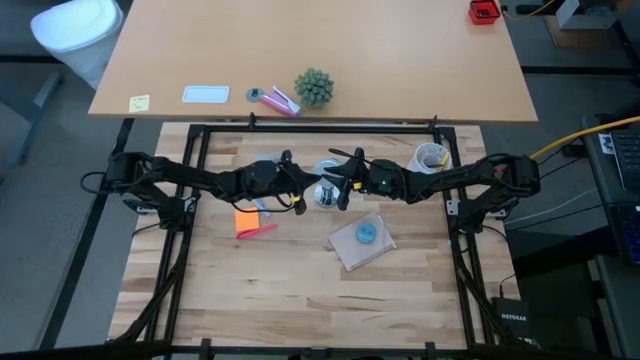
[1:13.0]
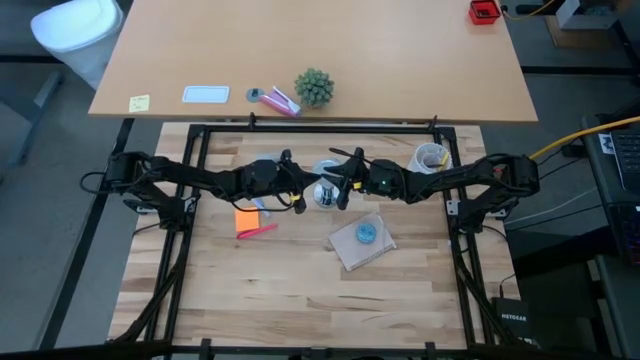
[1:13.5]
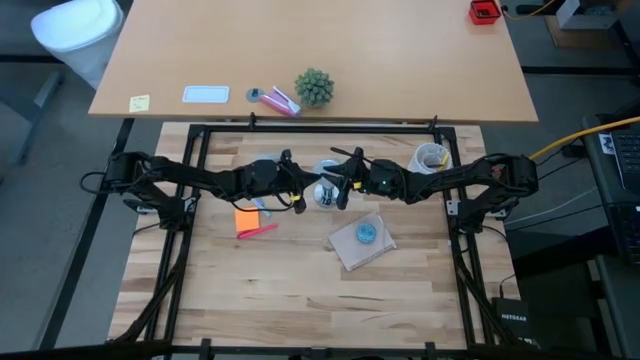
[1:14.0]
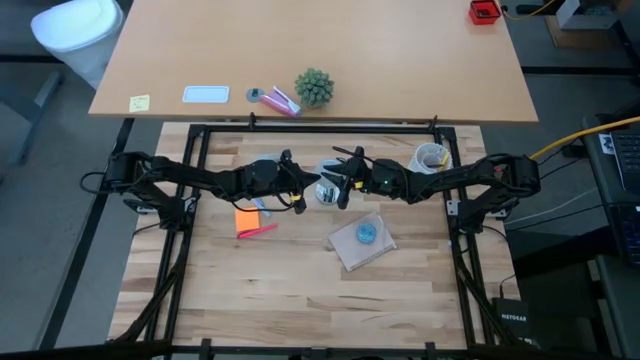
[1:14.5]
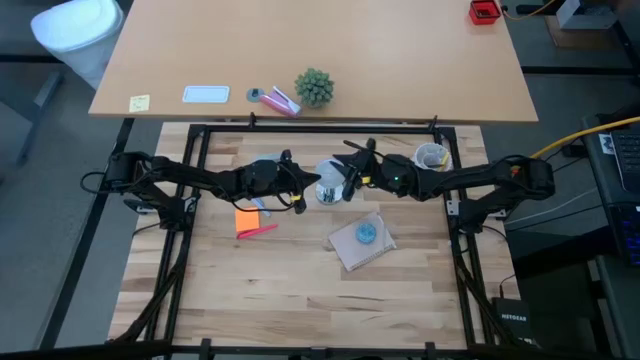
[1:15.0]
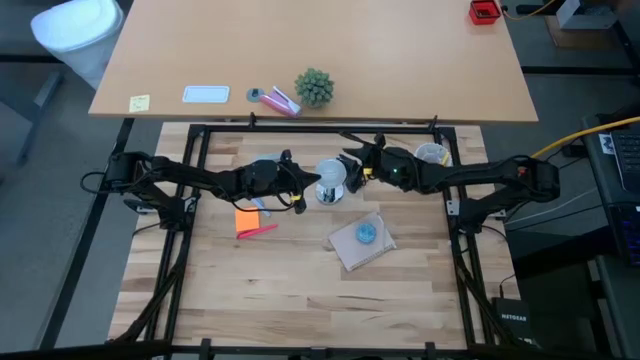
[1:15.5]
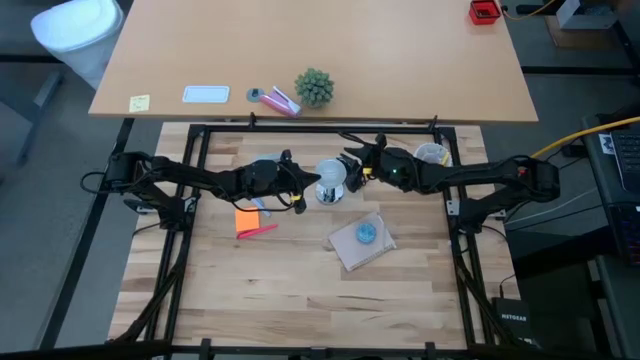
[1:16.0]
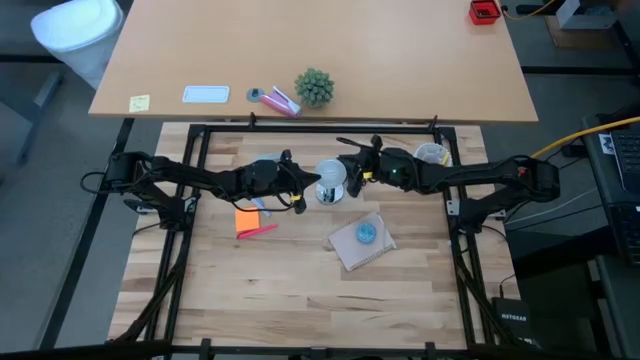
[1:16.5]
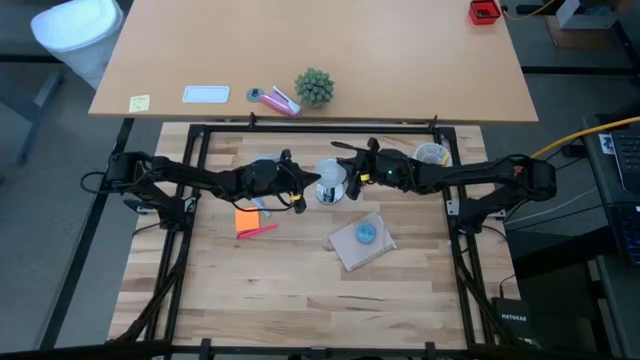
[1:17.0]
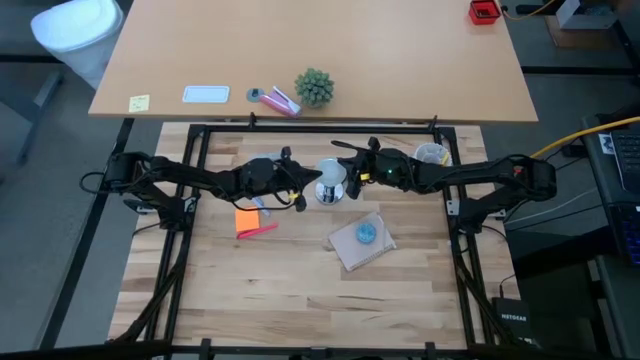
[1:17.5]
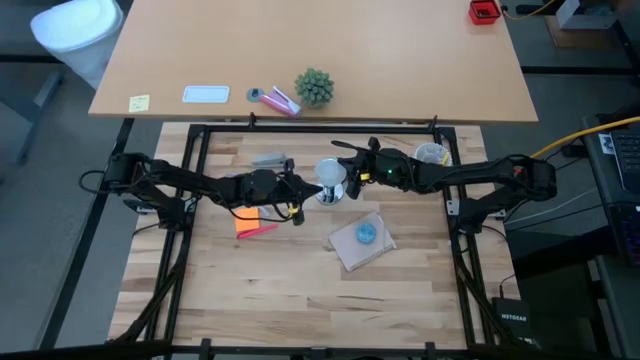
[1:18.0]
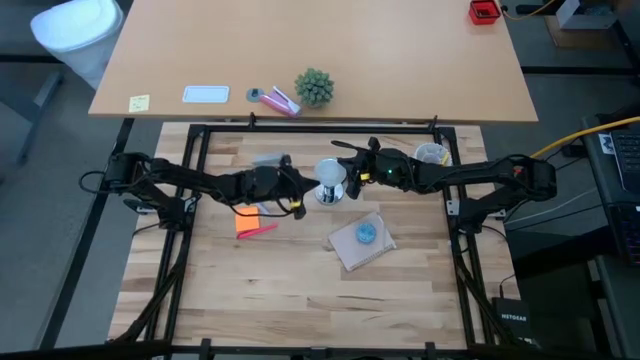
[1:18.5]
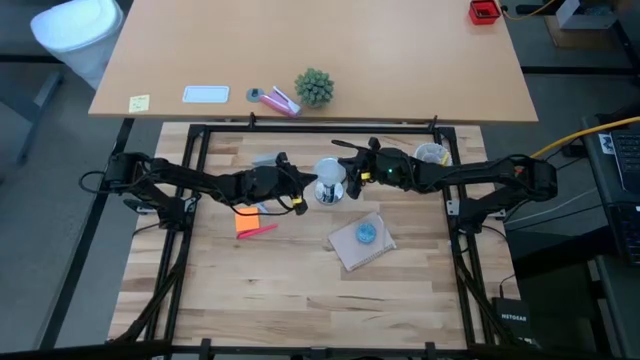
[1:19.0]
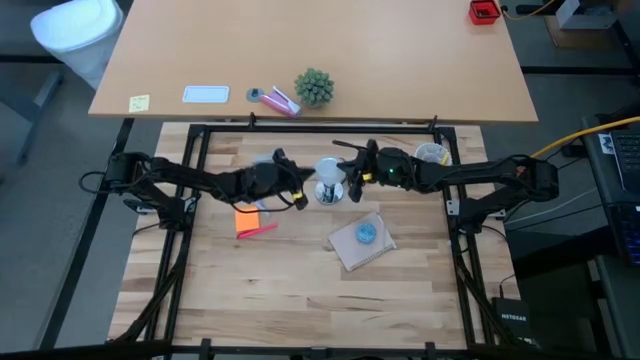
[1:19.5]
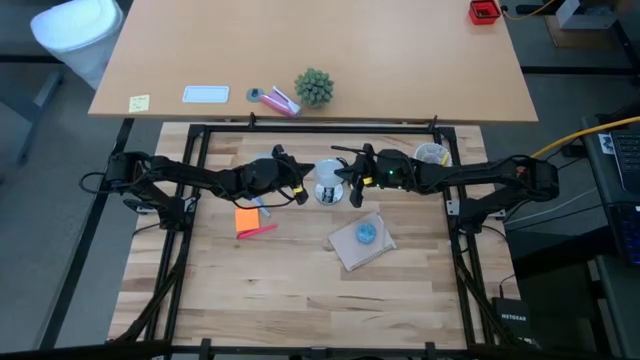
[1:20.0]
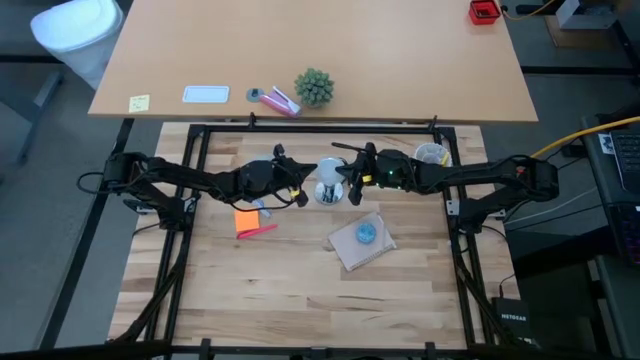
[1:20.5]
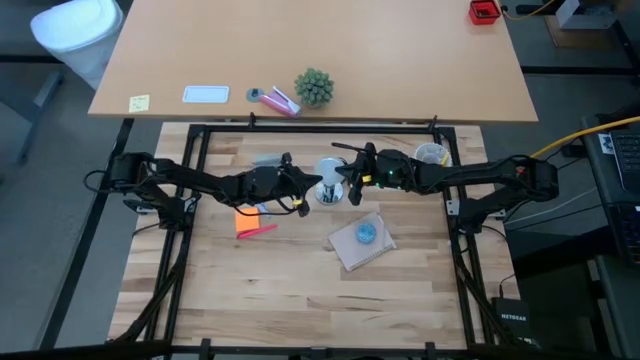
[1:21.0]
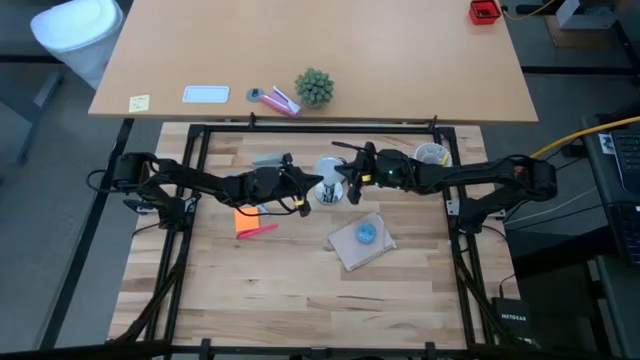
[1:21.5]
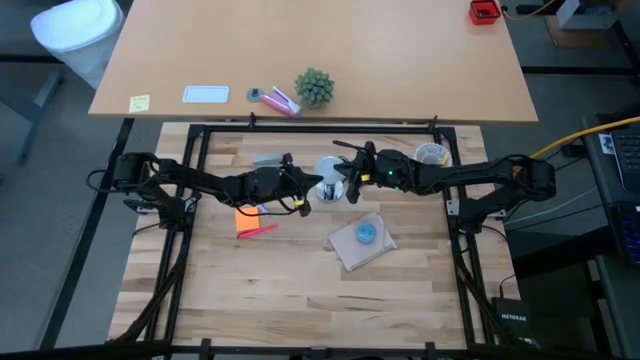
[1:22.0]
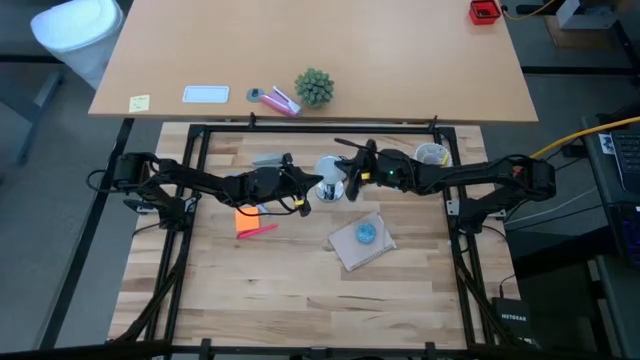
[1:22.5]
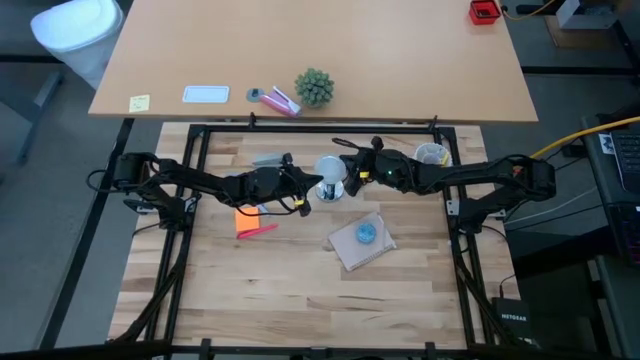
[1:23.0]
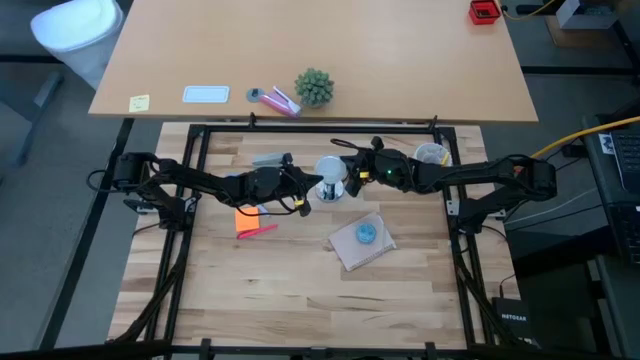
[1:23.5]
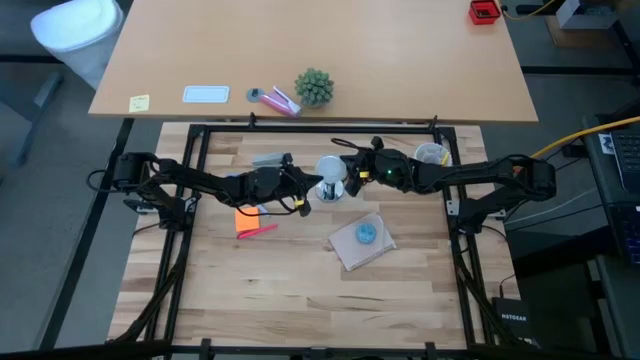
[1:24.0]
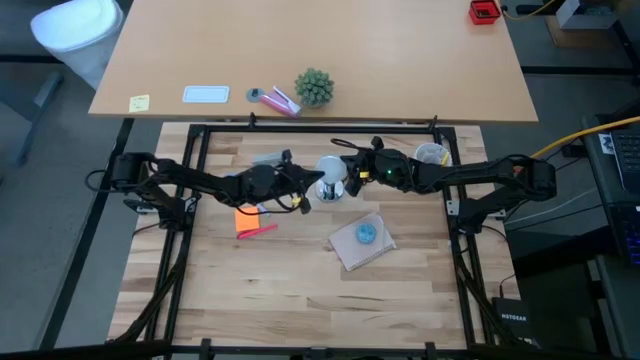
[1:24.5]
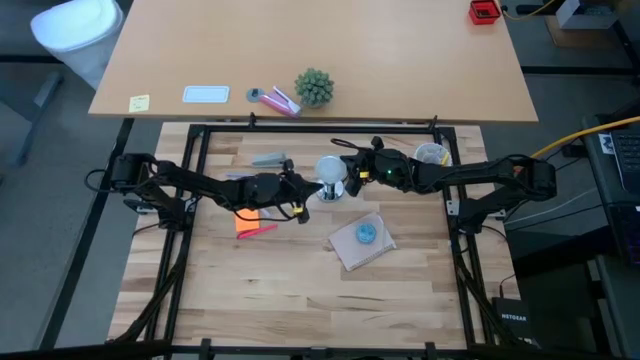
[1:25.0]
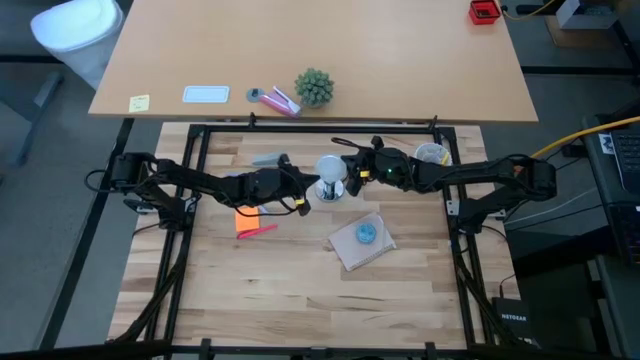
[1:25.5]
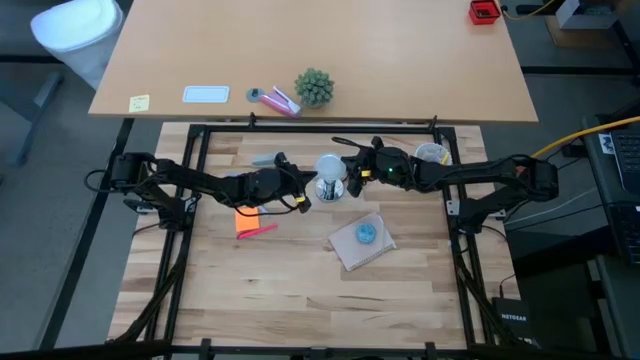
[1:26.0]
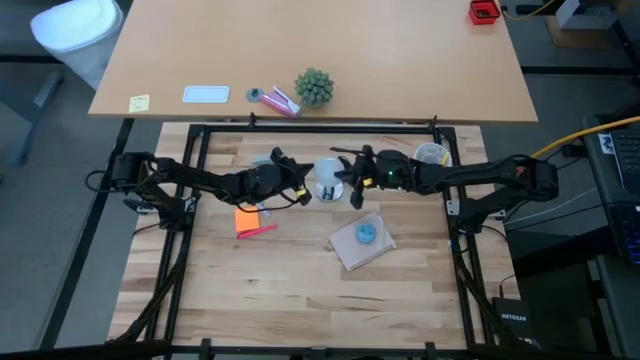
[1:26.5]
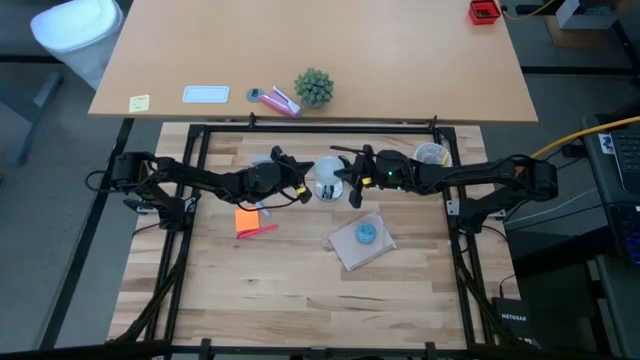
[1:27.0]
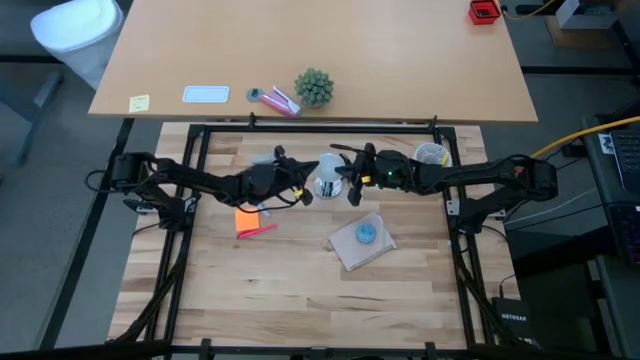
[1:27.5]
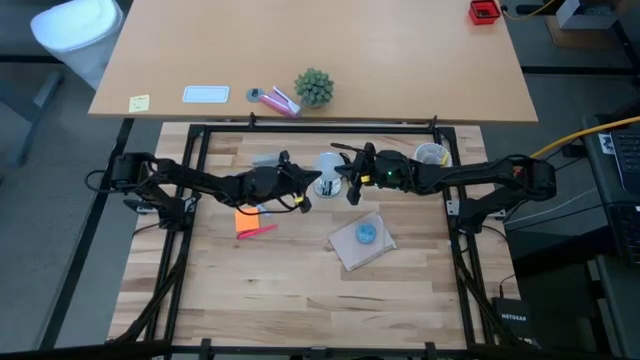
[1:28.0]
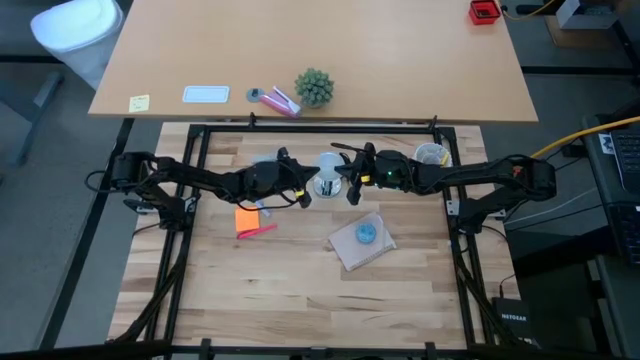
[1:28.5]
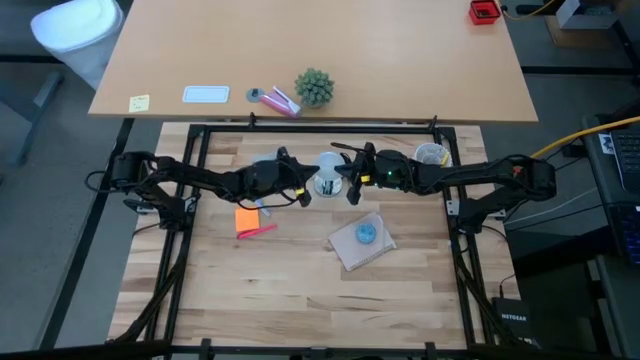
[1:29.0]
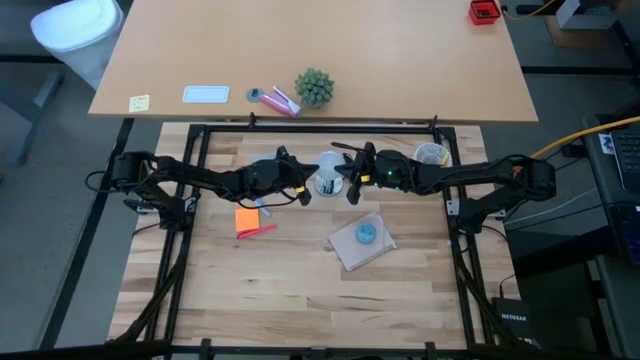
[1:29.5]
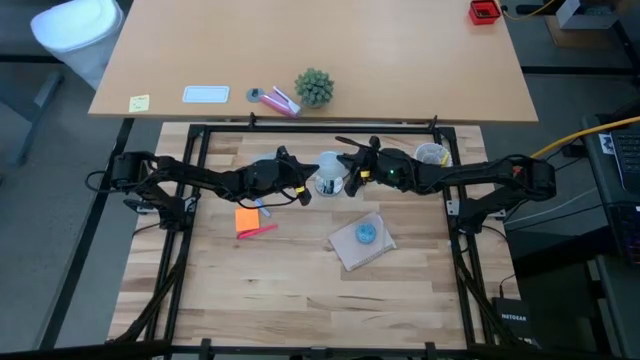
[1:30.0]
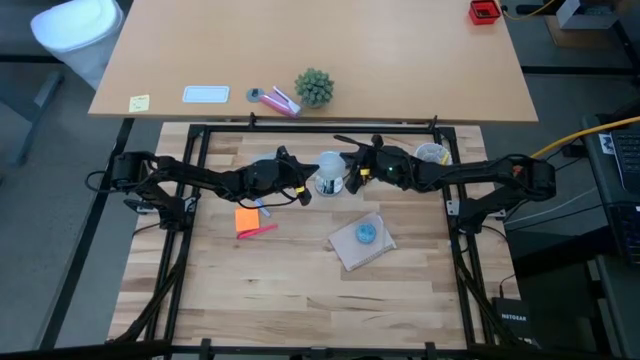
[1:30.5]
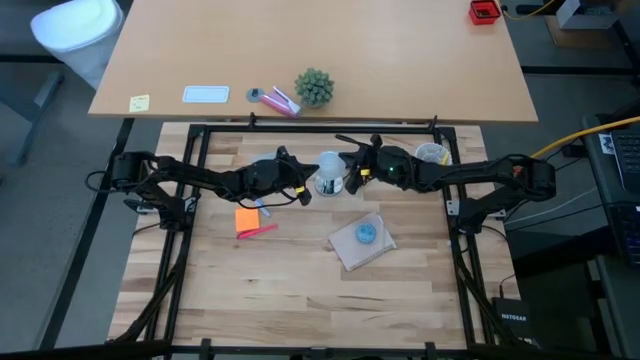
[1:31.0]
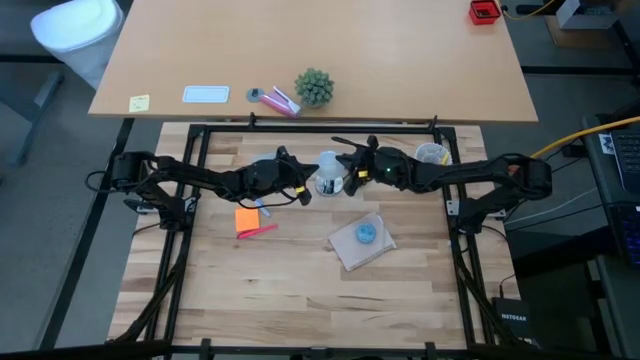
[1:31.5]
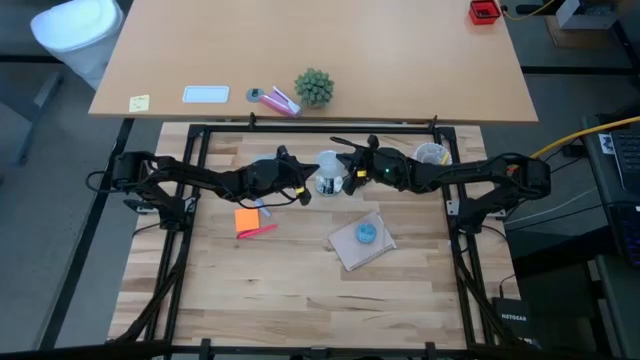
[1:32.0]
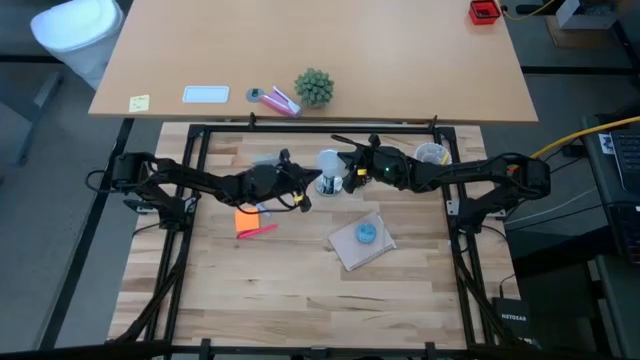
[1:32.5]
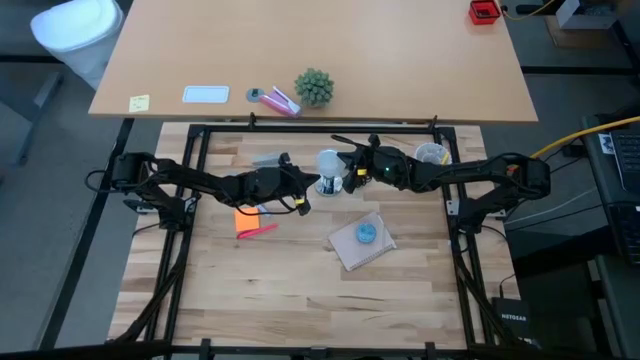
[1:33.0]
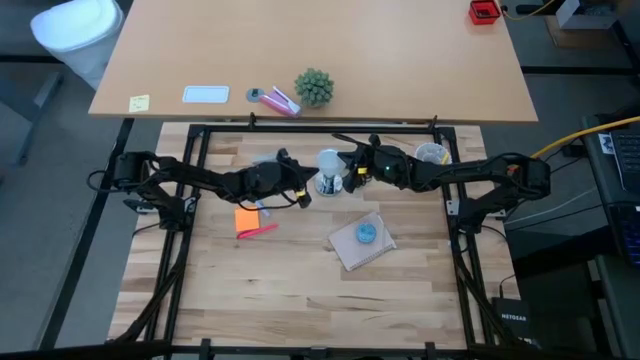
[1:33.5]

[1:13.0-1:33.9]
Task: Screw lightbulb
Insert the lightbulb into the lamp
